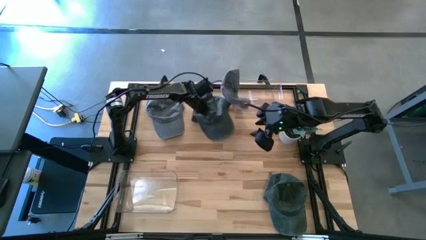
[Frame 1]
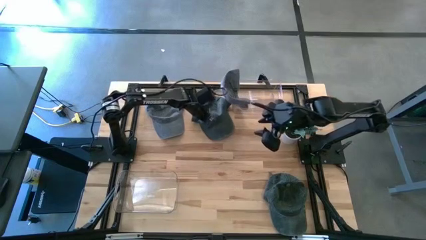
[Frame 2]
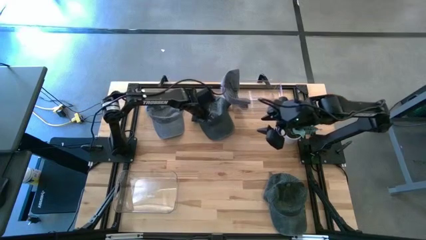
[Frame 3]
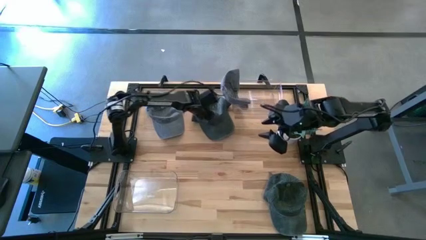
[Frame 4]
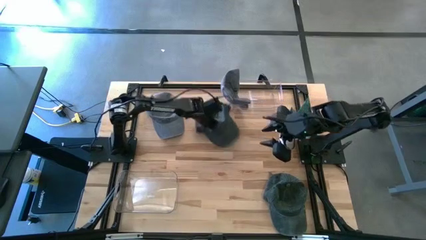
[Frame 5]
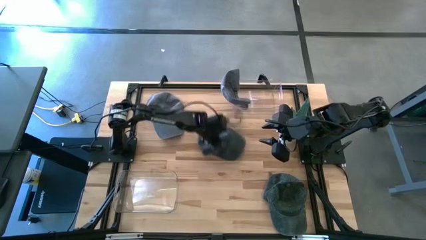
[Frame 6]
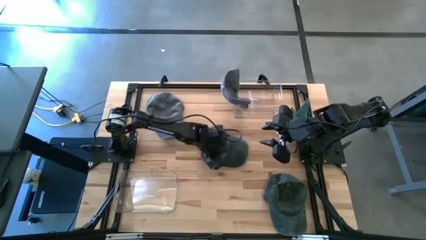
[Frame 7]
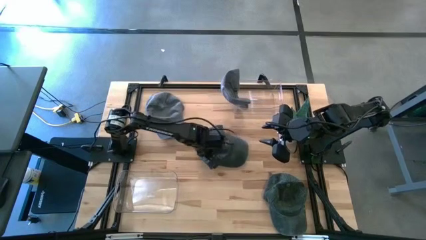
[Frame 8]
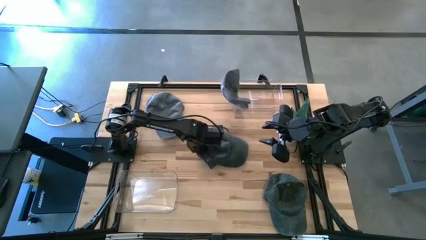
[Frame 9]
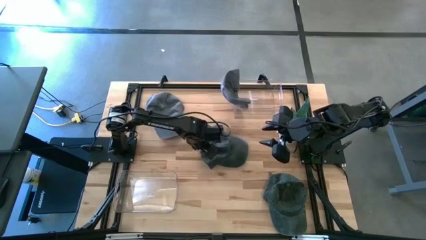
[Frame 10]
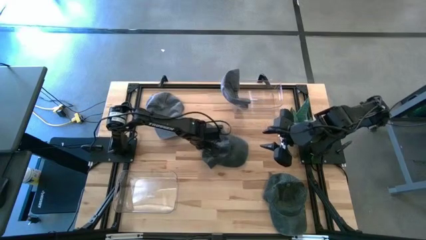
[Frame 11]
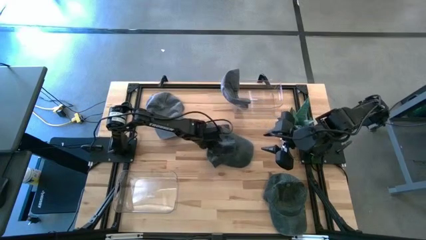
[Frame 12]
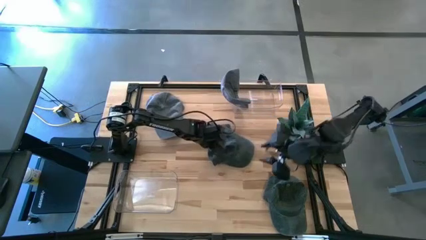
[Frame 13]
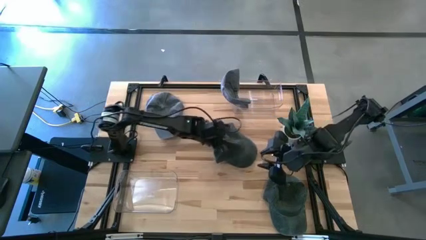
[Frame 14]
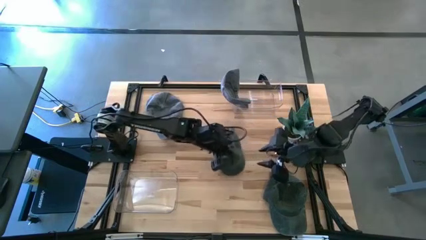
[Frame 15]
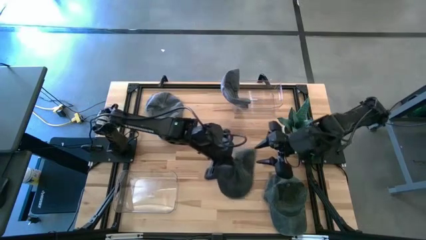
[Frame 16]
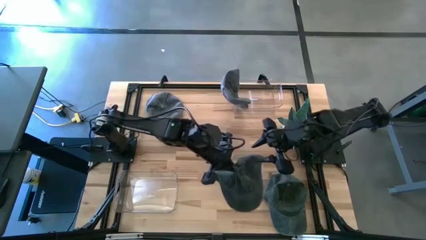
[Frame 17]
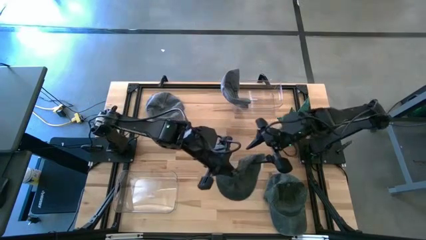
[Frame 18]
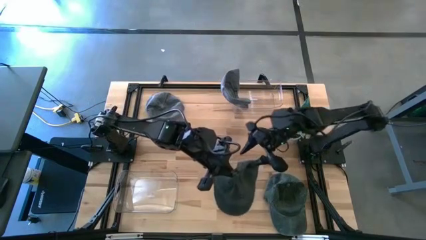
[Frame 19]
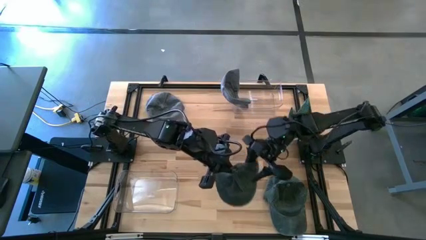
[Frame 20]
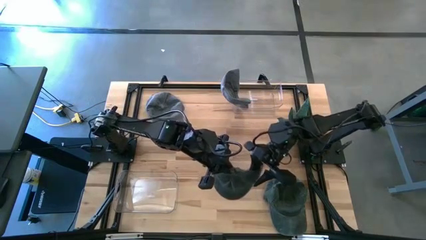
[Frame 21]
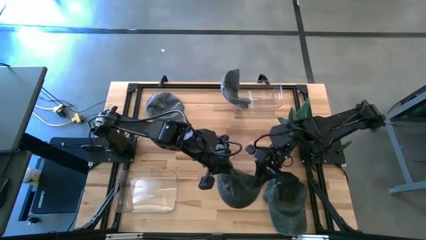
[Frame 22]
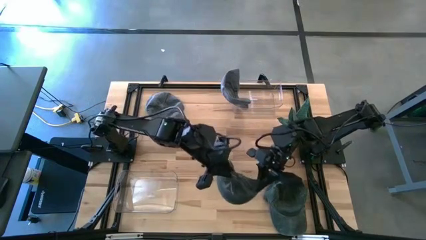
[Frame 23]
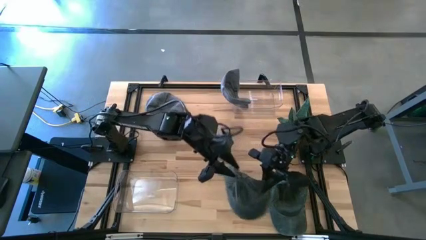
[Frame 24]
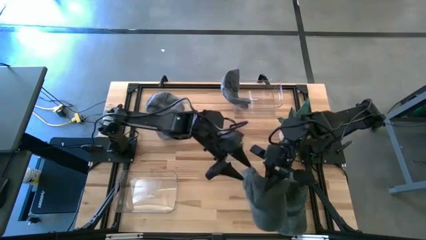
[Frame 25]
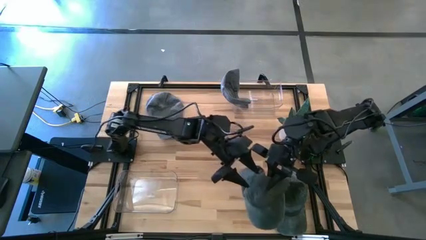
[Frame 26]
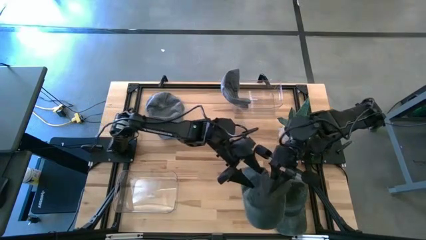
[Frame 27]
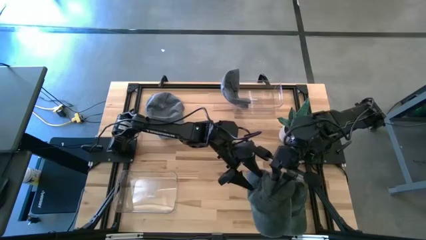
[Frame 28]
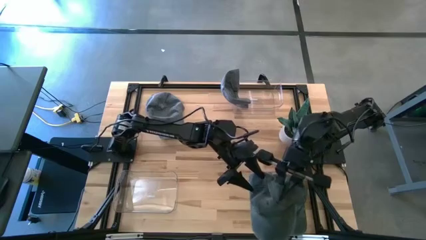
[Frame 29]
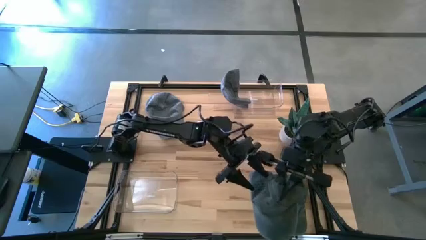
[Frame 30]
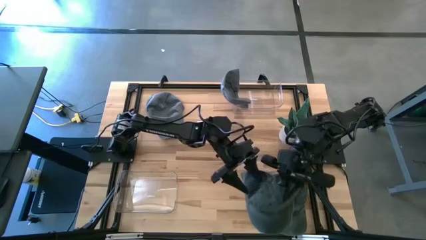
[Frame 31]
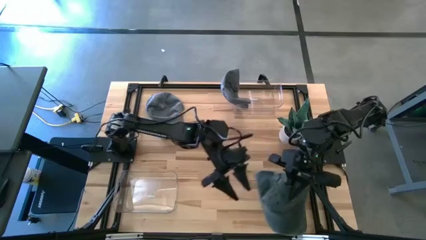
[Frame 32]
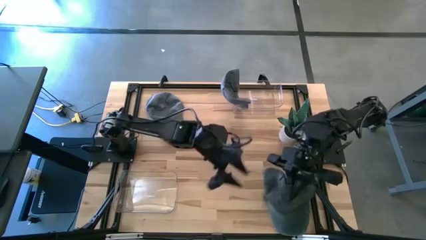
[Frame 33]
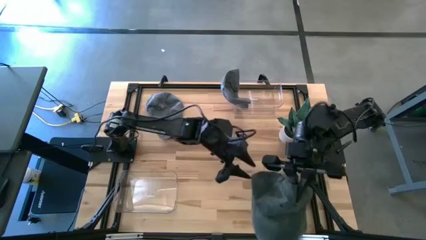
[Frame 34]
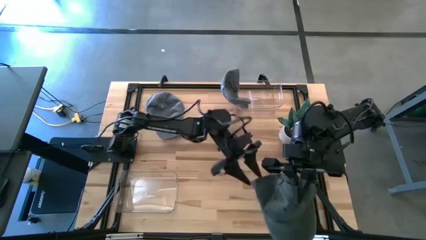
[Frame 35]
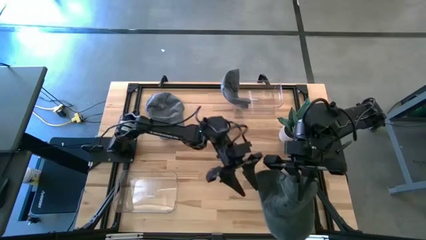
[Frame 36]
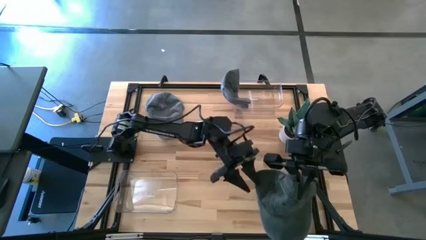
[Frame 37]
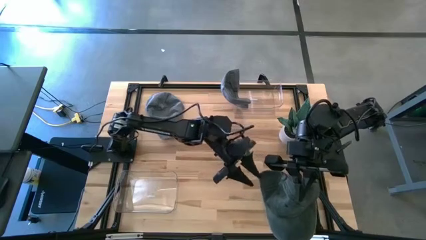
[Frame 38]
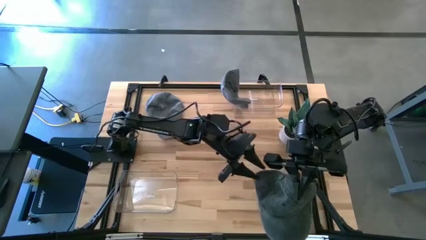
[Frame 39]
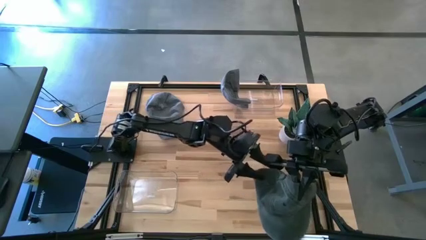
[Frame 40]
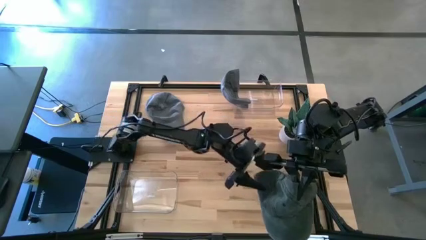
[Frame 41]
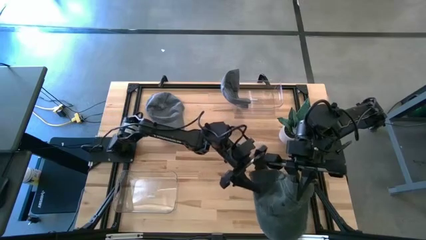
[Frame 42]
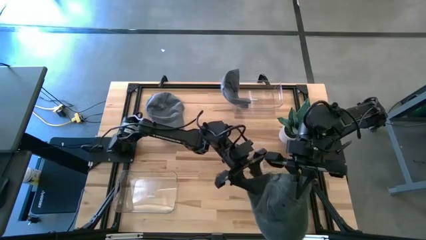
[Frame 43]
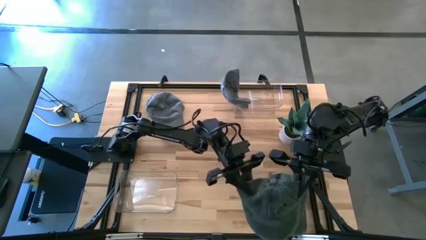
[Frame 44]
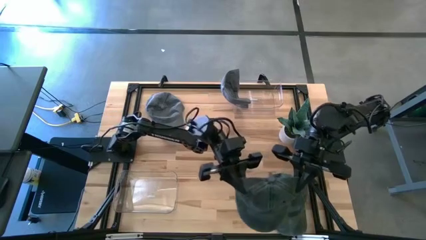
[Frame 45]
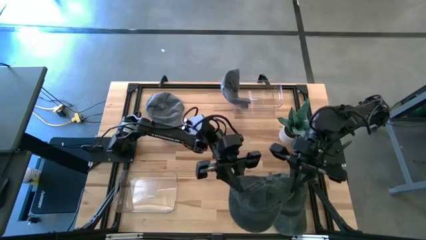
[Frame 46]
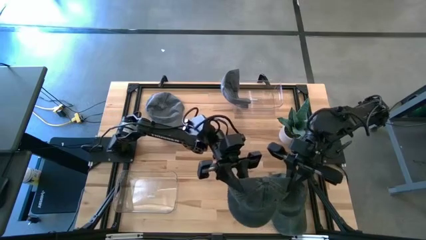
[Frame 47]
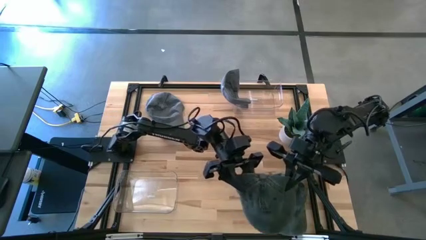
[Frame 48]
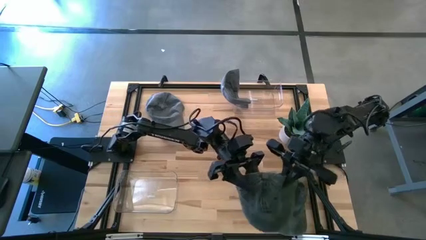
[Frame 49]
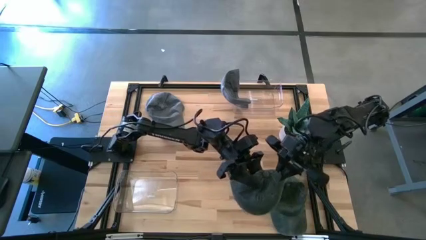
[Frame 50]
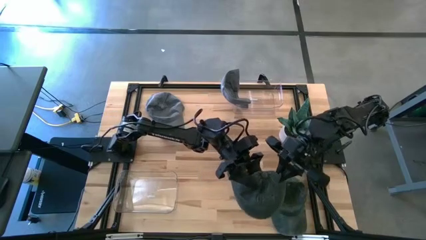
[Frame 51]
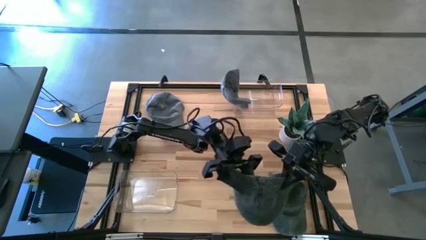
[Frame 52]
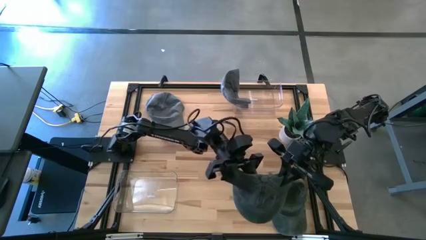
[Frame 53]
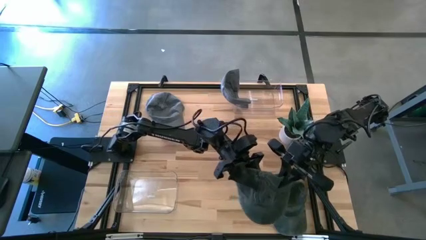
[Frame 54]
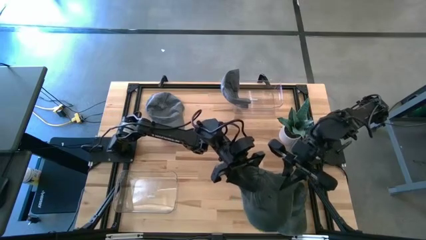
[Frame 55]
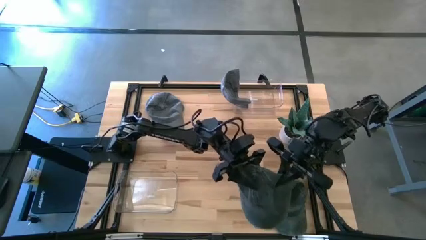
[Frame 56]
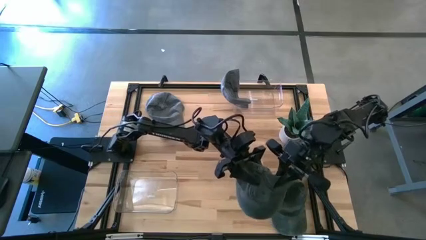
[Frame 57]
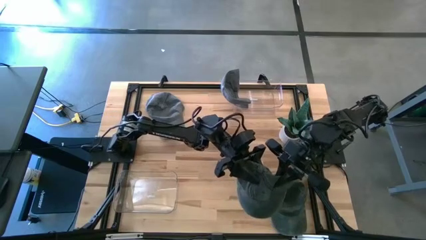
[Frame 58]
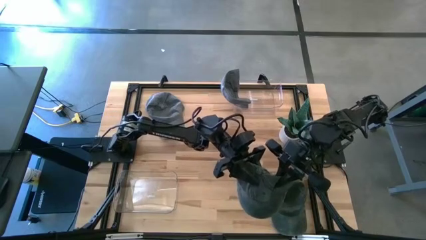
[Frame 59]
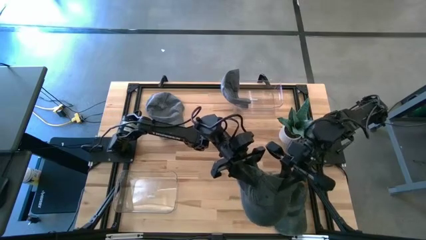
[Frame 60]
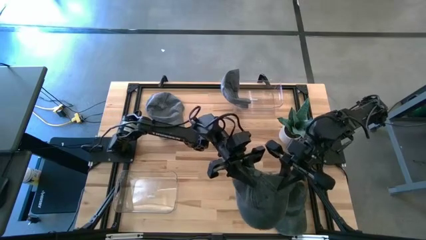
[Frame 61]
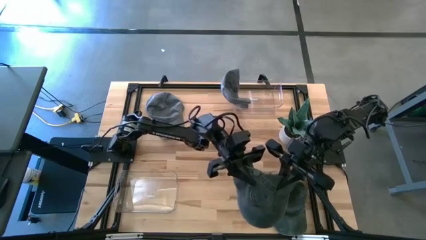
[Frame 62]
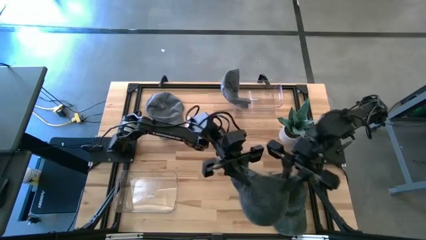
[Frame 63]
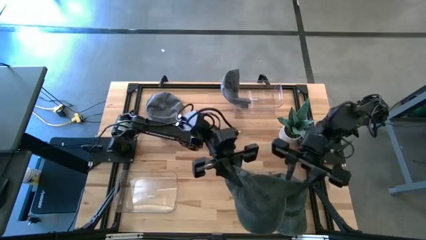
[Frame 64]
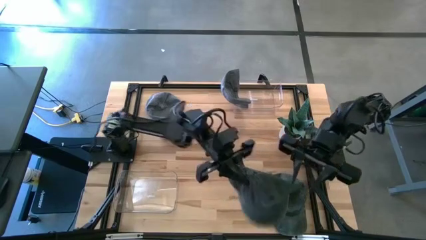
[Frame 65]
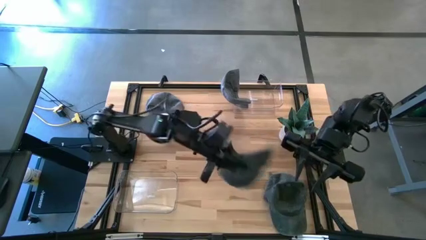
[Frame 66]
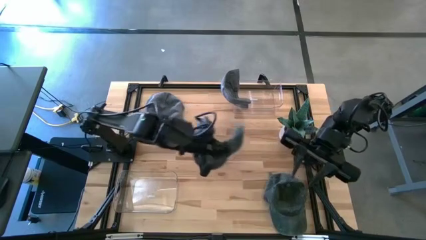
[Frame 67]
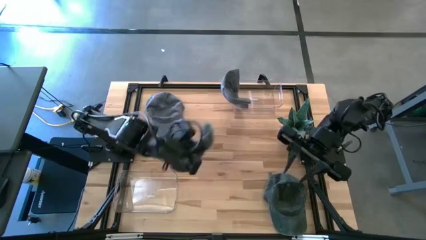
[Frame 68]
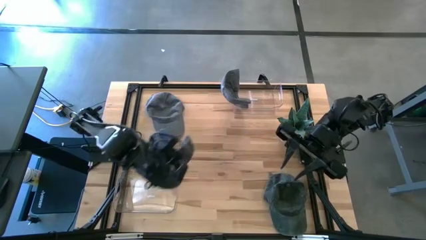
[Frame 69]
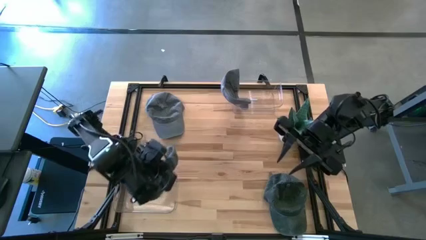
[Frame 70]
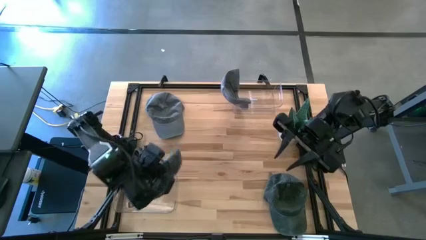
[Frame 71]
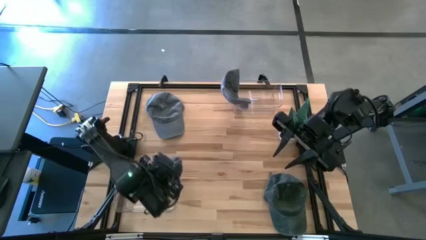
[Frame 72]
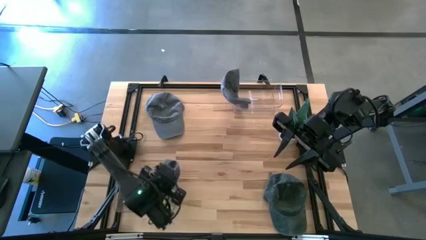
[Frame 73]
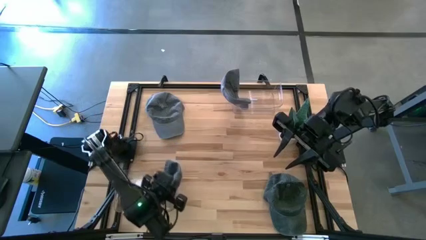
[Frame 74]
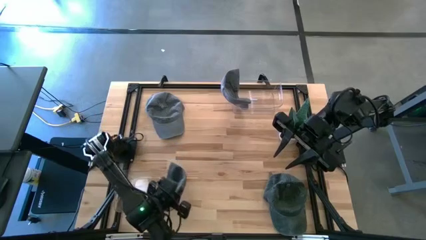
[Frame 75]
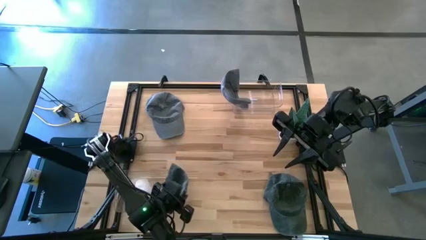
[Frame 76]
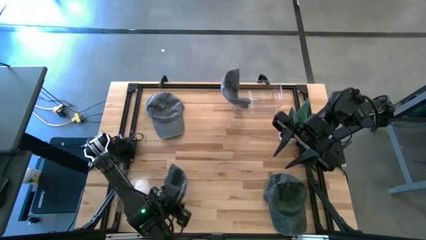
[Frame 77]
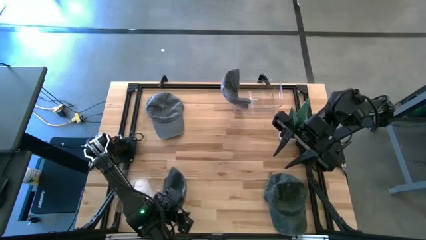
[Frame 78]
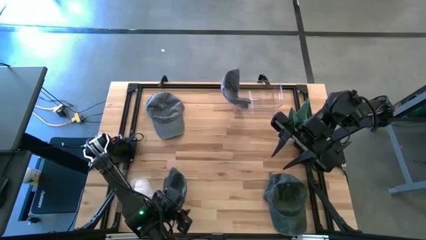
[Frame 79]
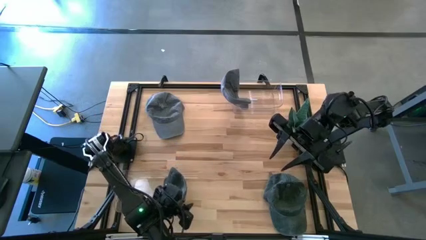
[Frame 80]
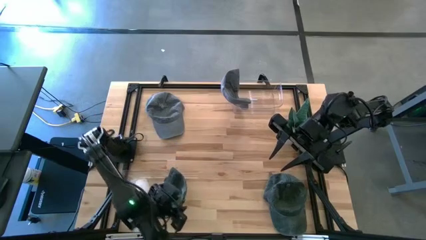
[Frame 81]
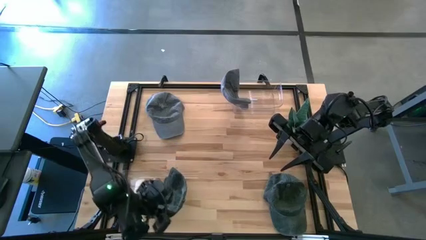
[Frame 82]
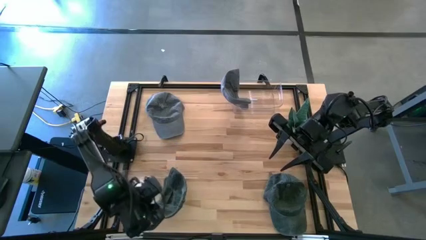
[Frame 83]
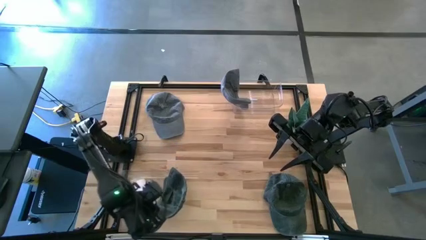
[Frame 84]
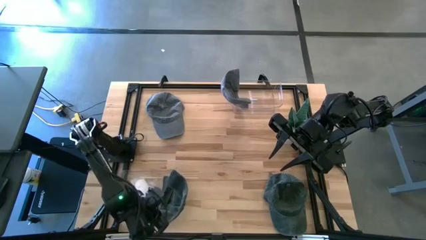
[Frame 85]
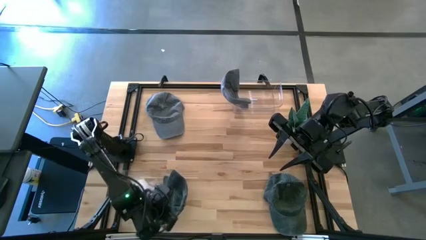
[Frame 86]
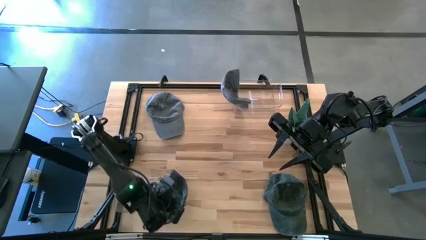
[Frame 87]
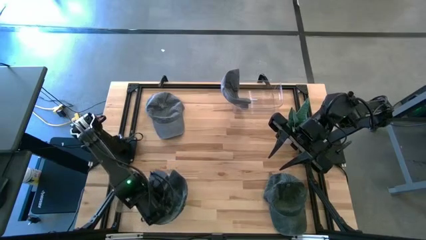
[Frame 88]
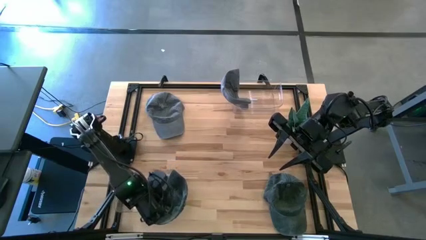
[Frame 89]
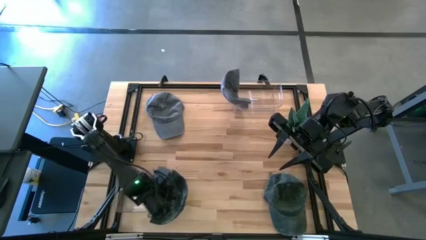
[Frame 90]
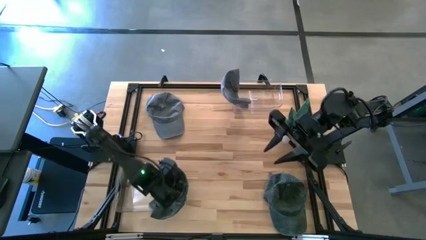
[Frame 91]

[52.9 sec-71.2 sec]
Task: Pick & Place hat
Put the top black cap into the bottom transparent bin
